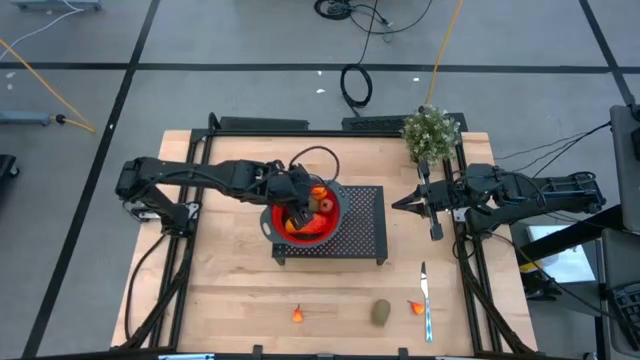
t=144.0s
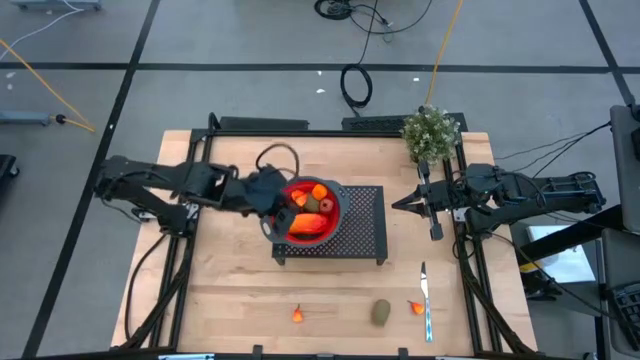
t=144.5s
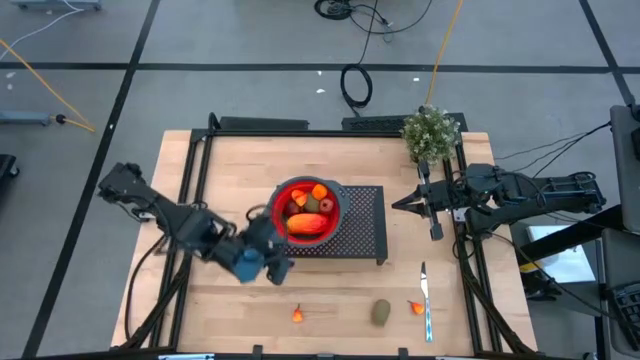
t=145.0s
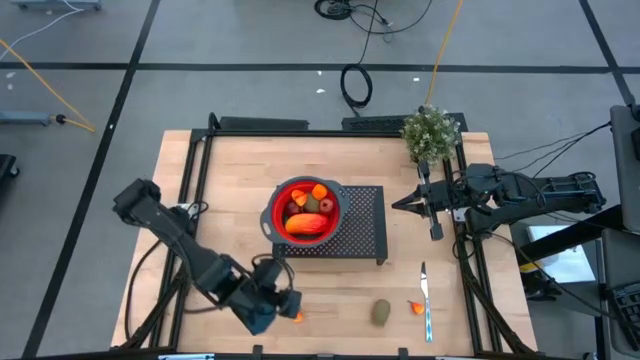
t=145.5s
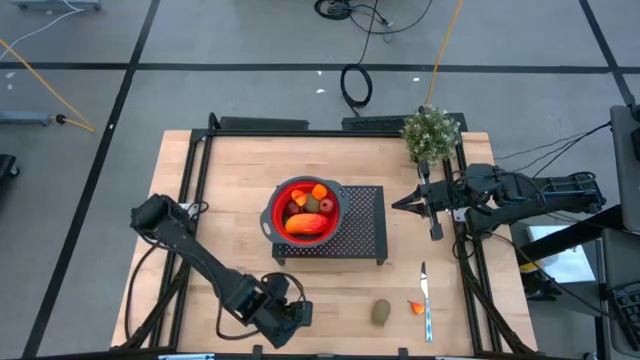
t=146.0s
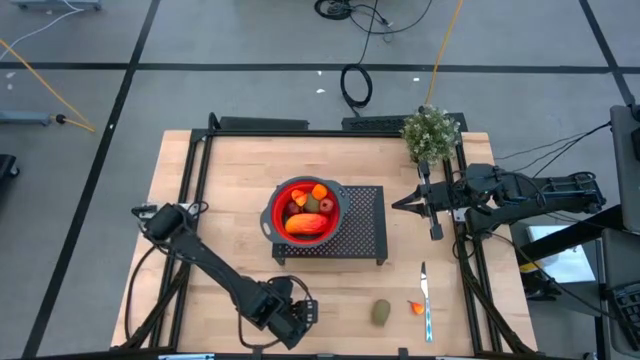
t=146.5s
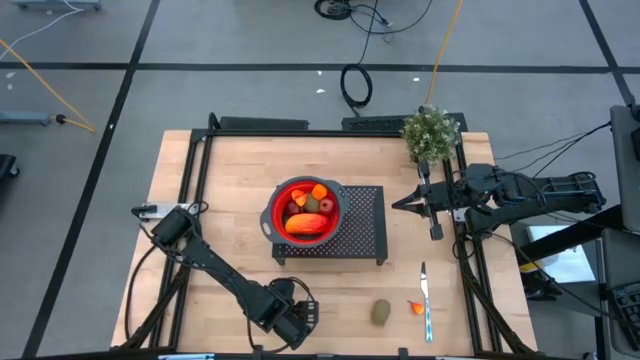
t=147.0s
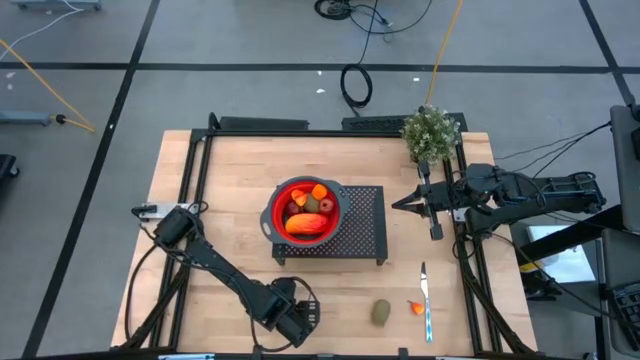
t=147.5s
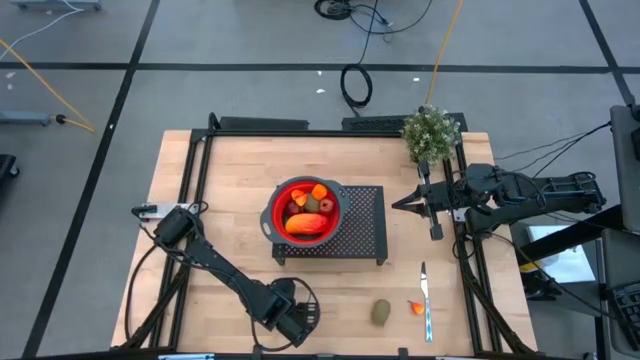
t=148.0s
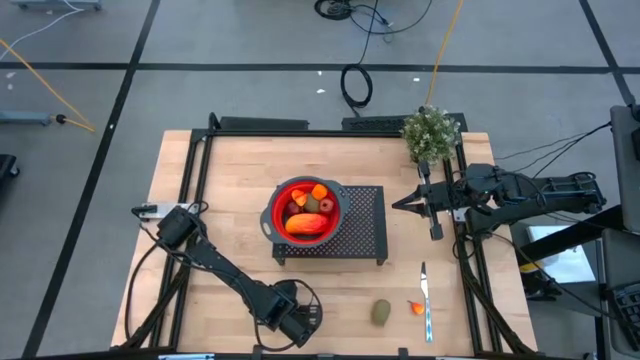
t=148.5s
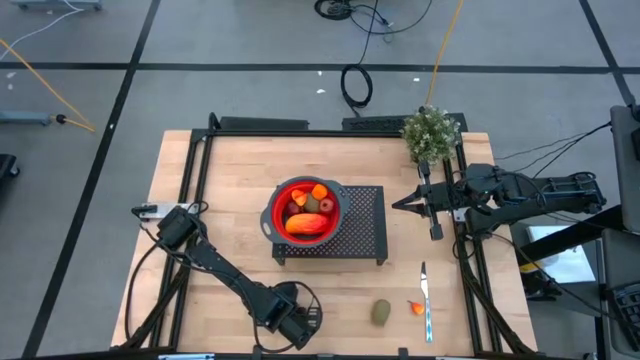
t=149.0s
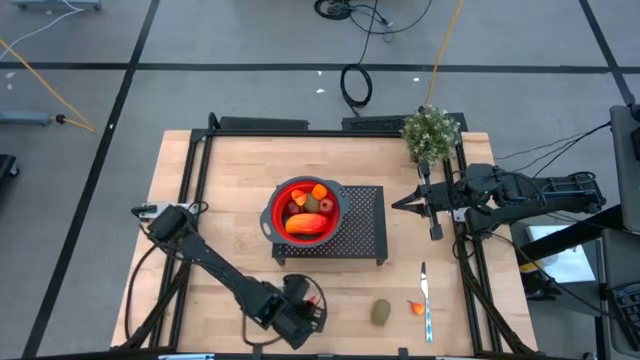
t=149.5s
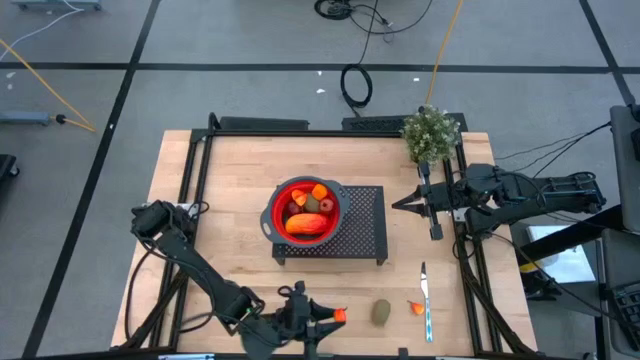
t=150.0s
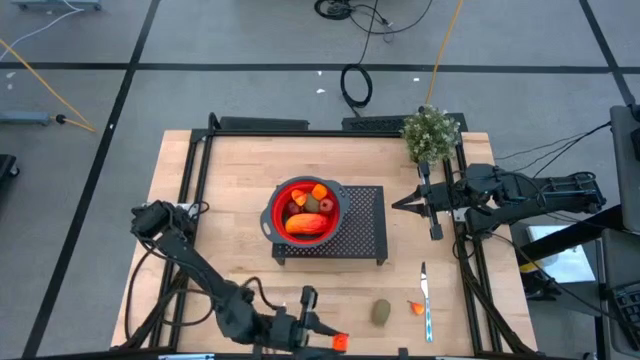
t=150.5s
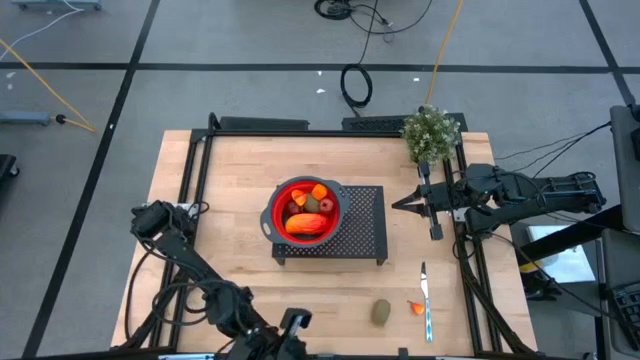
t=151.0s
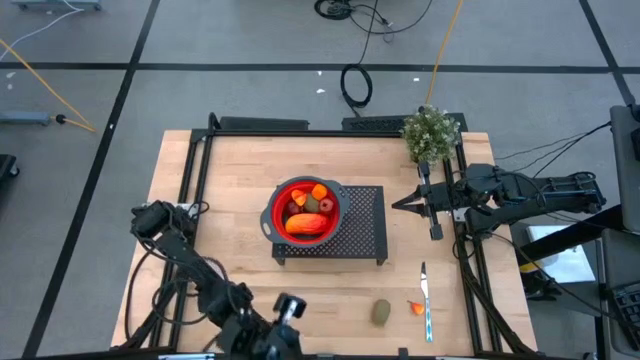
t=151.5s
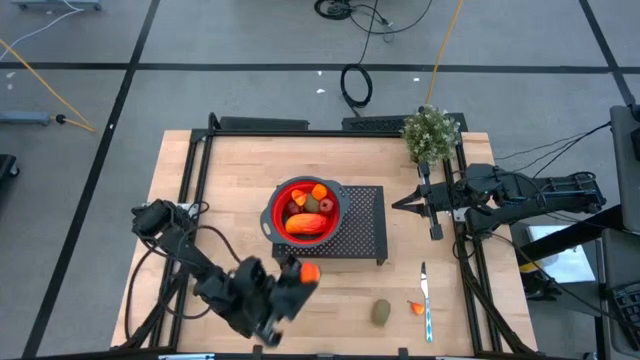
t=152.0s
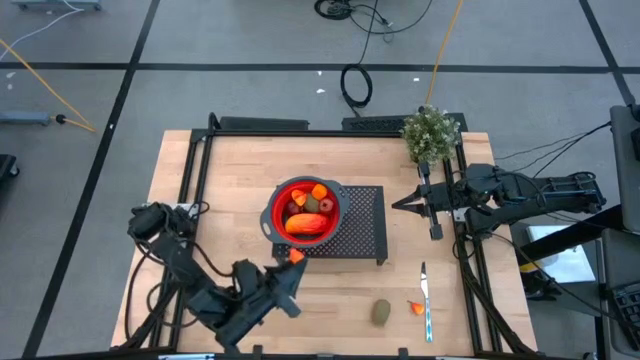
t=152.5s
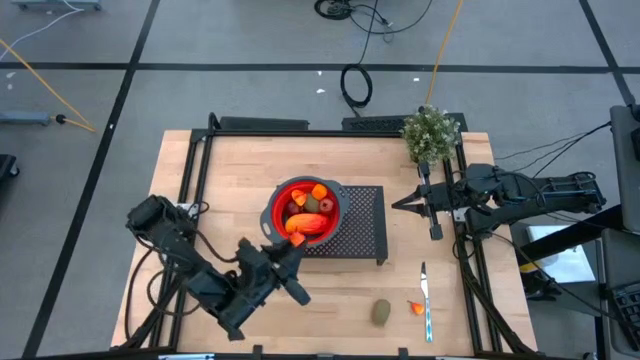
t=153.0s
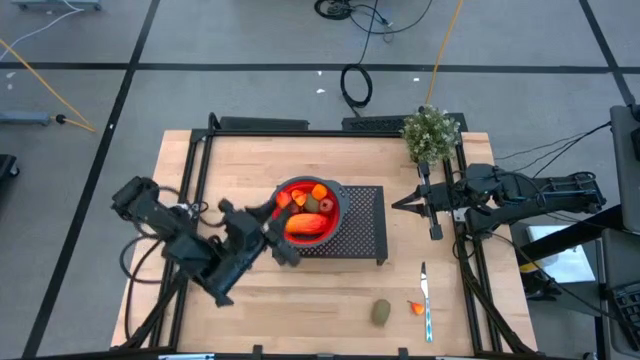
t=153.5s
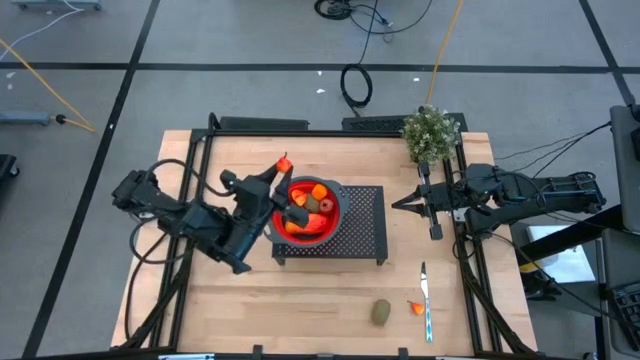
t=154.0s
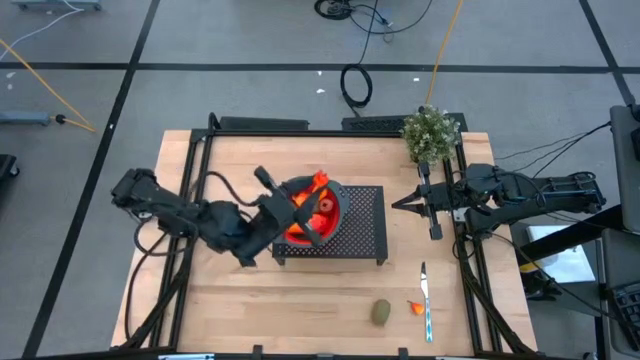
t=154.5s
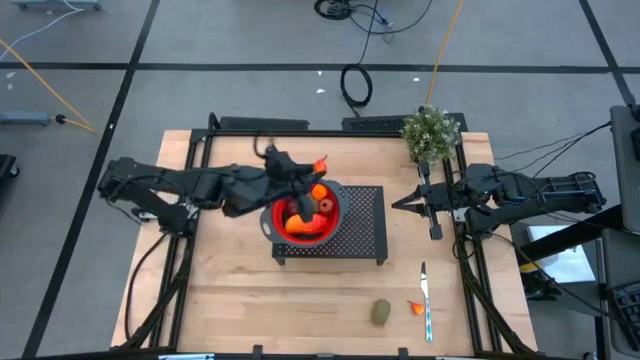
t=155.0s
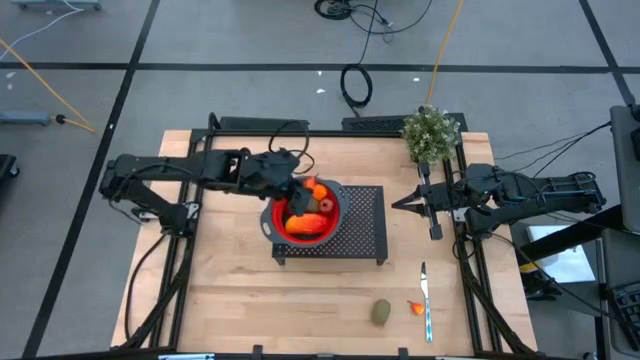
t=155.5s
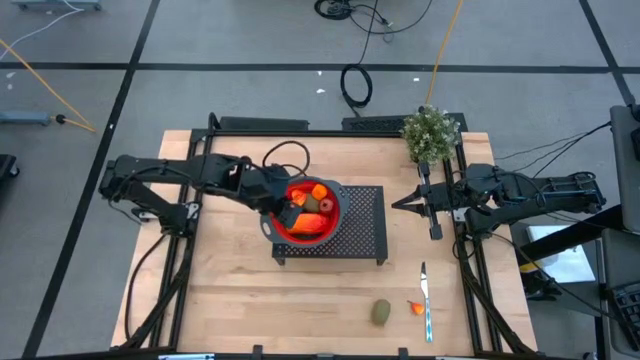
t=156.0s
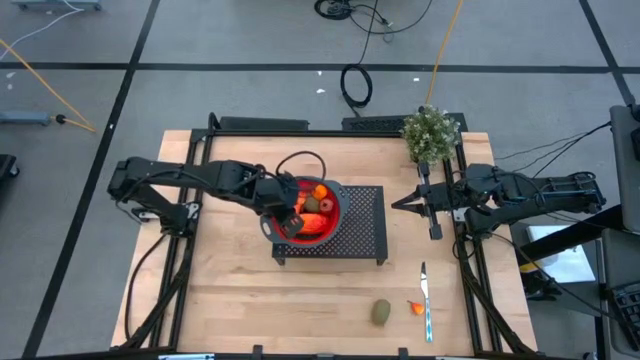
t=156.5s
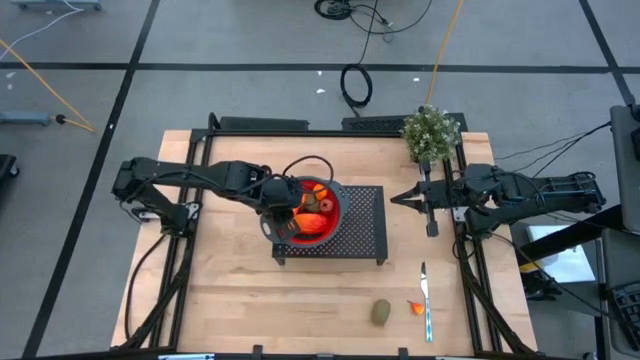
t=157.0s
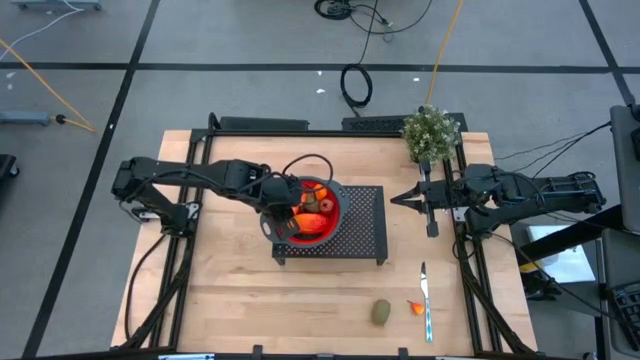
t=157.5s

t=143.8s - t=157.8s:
Task: Pick & Place Fruit
Put the orange pear into the red strainer bowl on the shelf

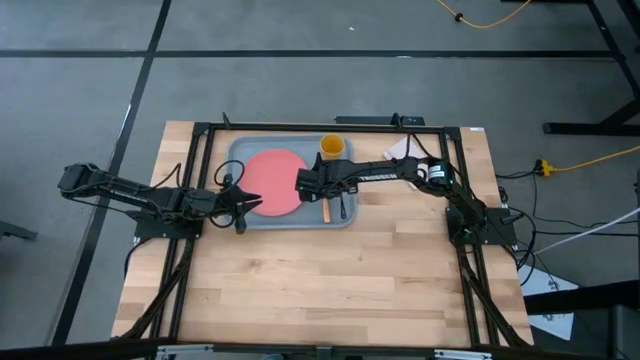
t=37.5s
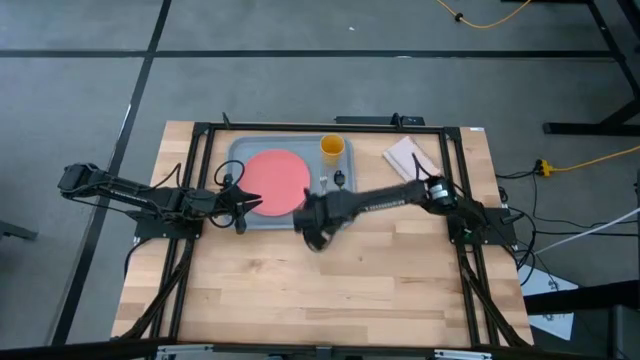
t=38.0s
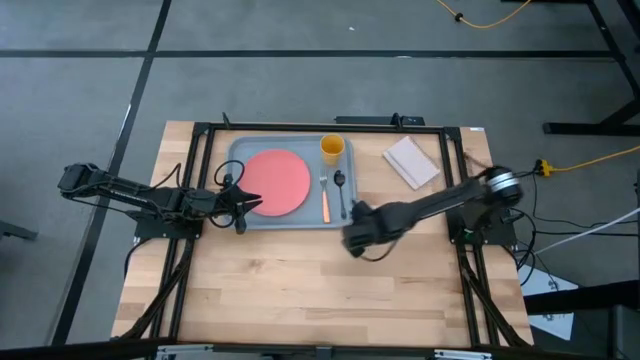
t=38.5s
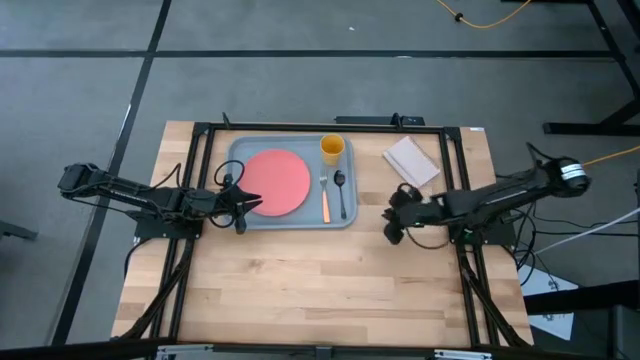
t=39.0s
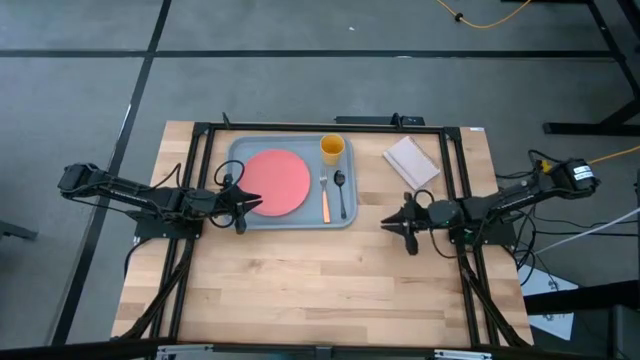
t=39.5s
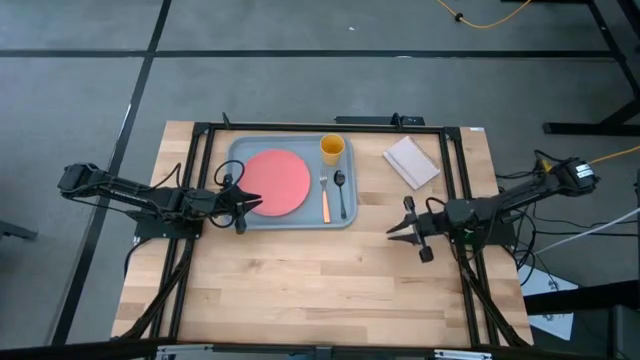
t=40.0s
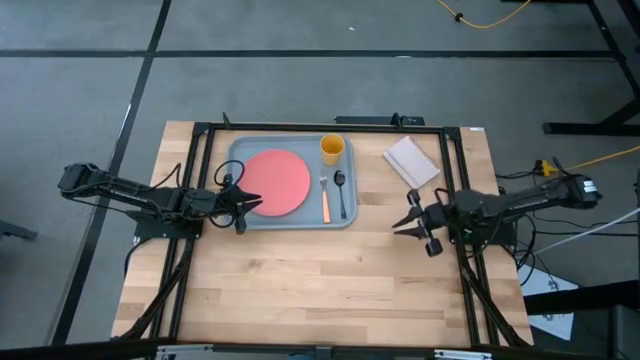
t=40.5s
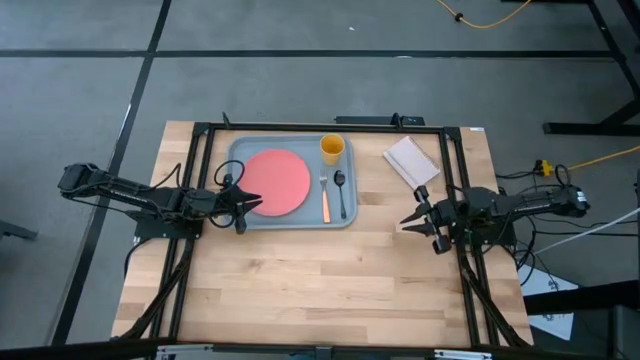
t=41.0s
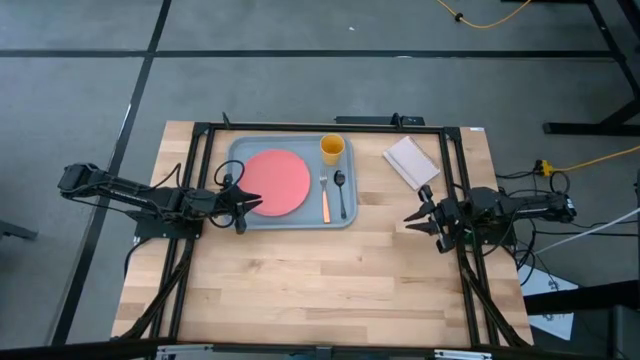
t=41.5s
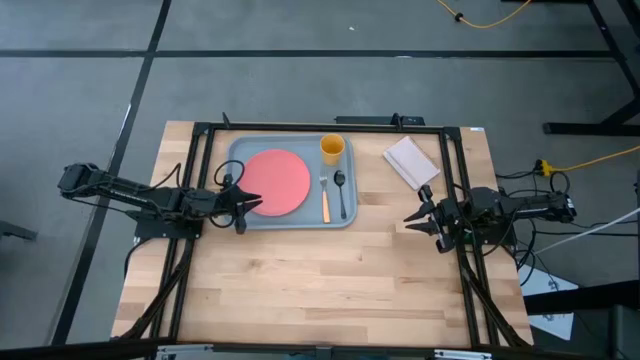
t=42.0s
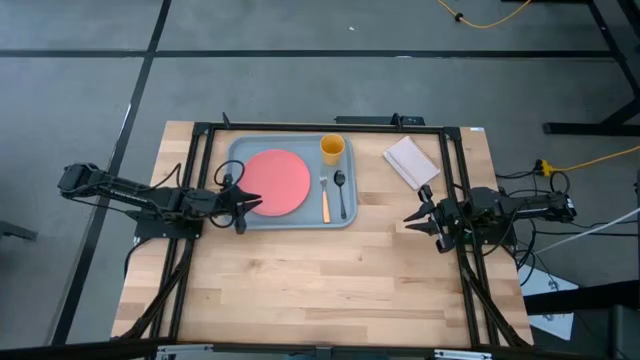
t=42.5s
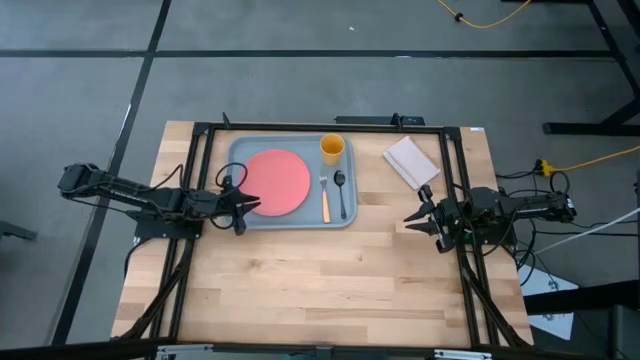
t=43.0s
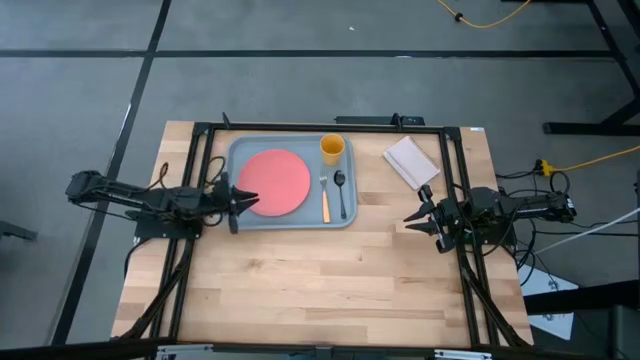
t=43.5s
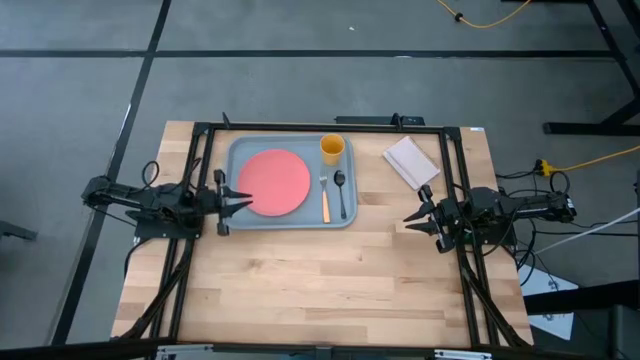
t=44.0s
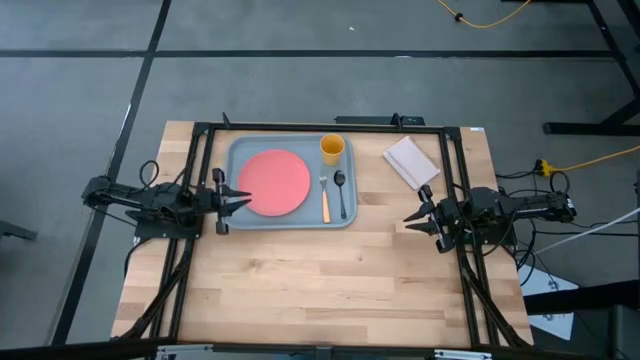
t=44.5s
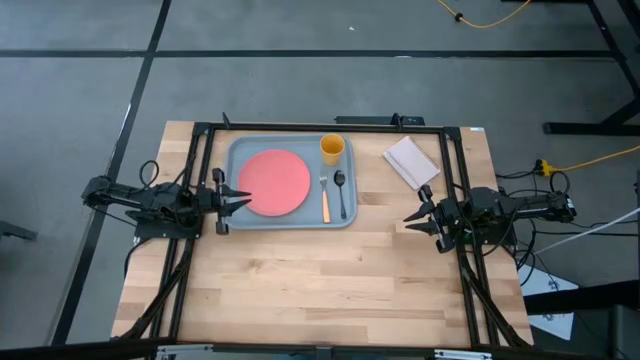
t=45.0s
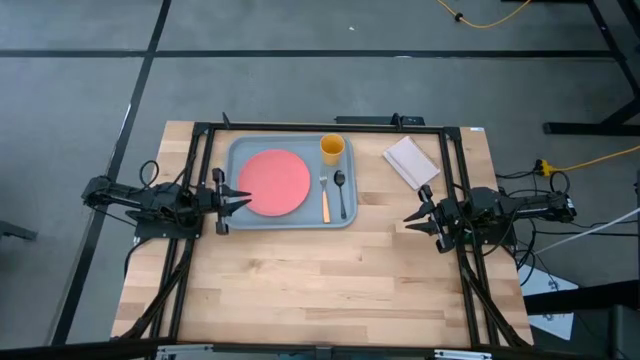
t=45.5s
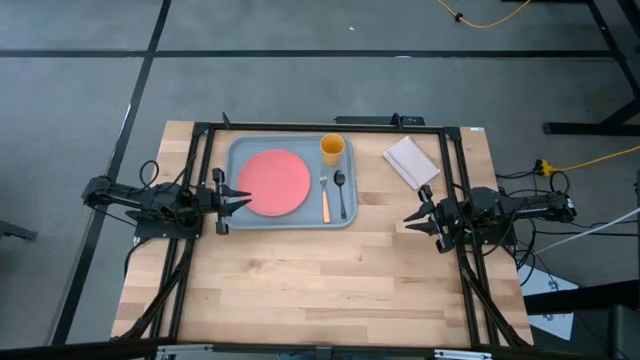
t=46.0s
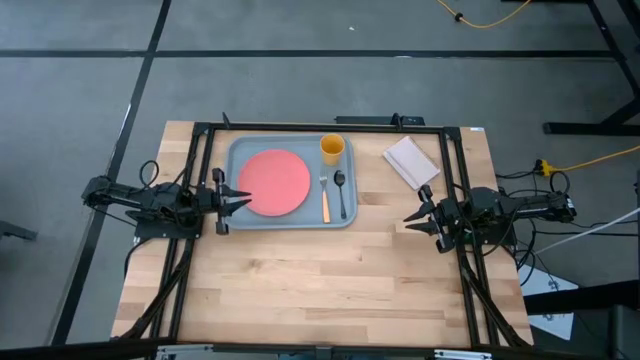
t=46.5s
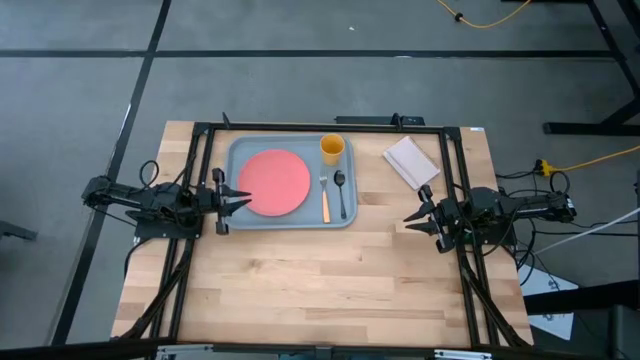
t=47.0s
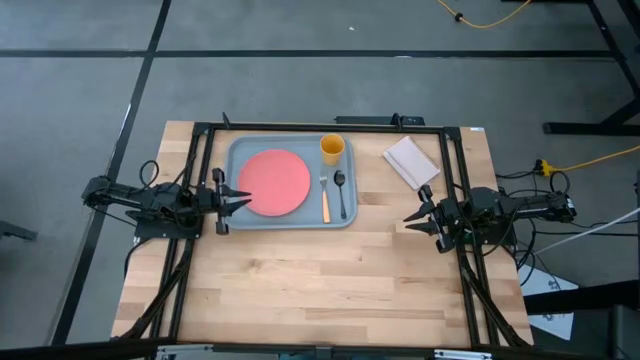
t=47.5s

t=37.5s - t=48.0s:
Task: Pick and place plate/cup/fork/spoon on tray
Return to Home Position
